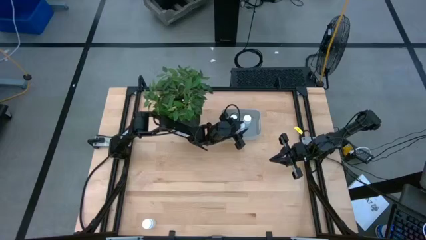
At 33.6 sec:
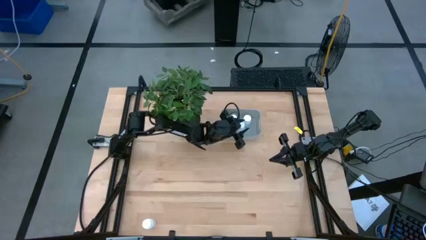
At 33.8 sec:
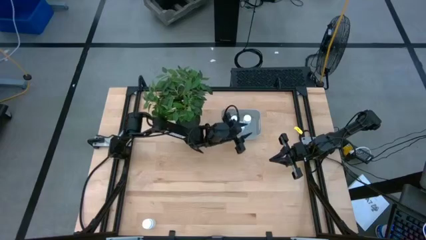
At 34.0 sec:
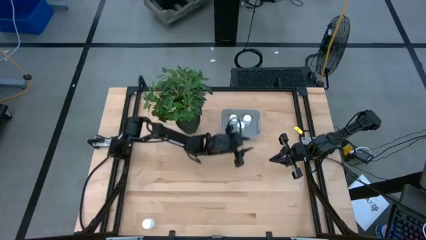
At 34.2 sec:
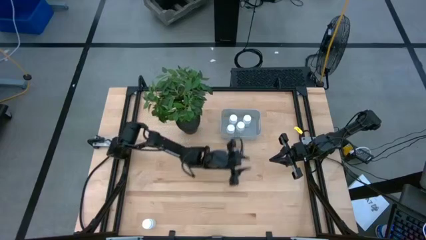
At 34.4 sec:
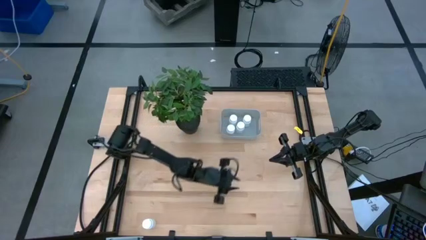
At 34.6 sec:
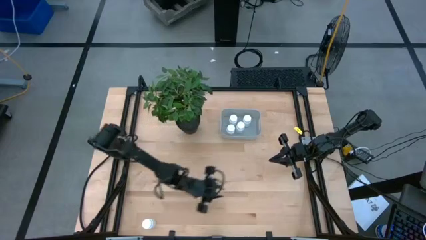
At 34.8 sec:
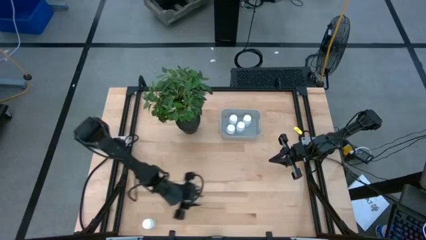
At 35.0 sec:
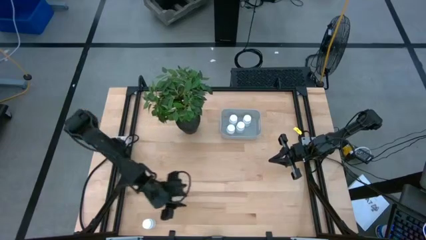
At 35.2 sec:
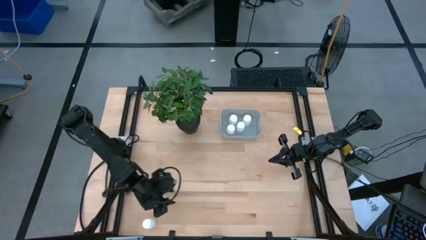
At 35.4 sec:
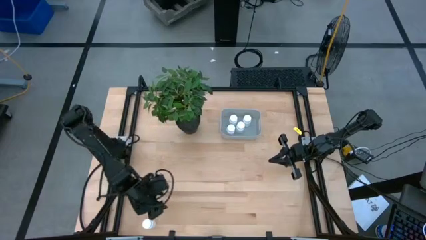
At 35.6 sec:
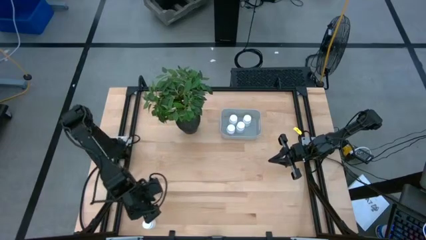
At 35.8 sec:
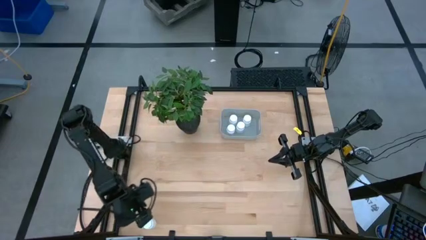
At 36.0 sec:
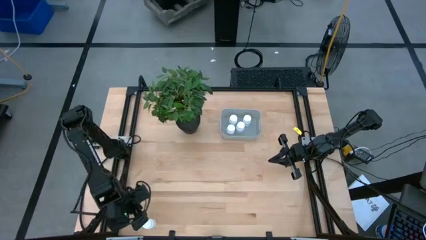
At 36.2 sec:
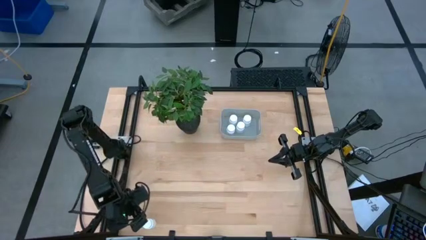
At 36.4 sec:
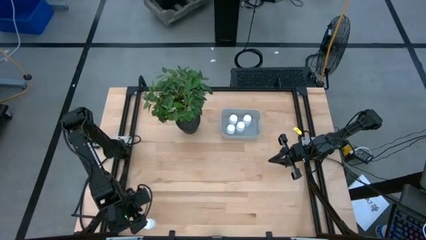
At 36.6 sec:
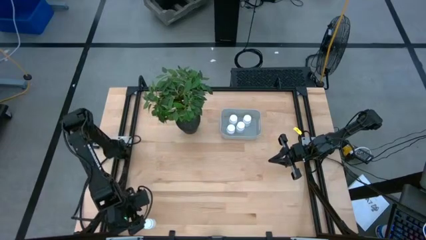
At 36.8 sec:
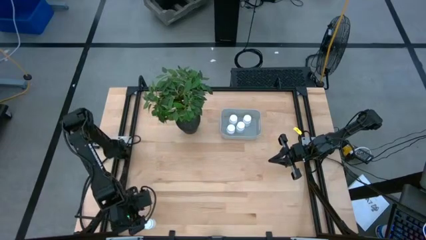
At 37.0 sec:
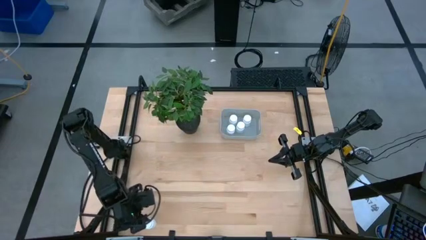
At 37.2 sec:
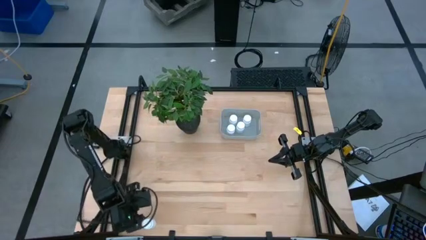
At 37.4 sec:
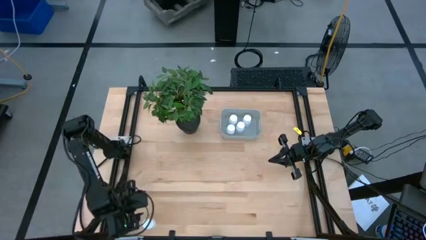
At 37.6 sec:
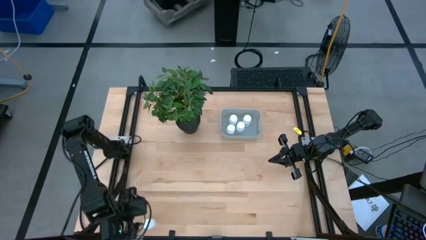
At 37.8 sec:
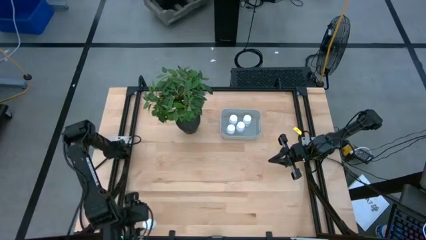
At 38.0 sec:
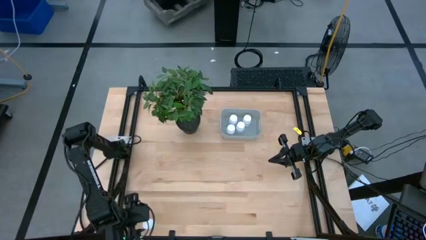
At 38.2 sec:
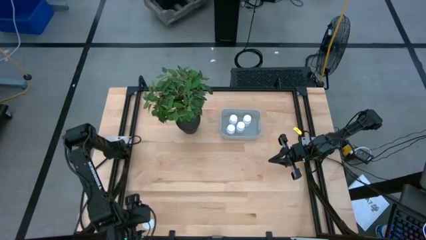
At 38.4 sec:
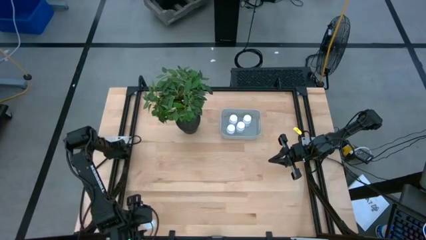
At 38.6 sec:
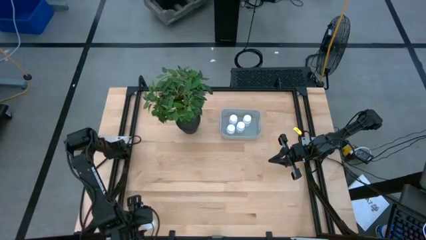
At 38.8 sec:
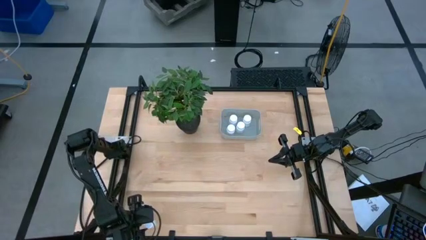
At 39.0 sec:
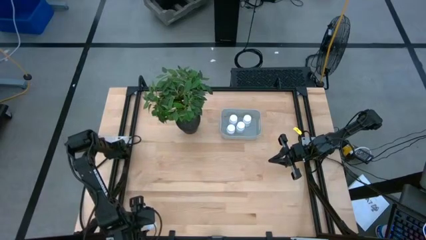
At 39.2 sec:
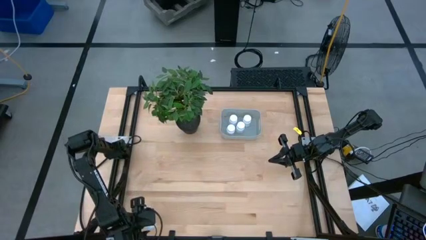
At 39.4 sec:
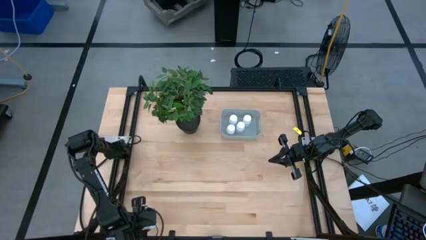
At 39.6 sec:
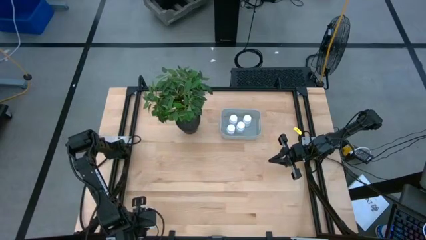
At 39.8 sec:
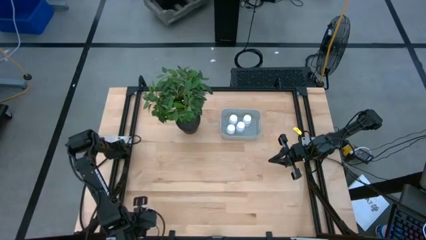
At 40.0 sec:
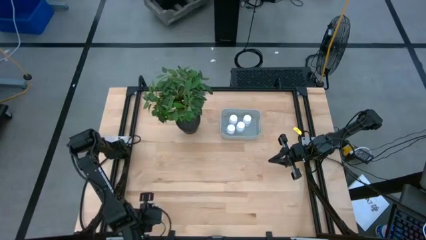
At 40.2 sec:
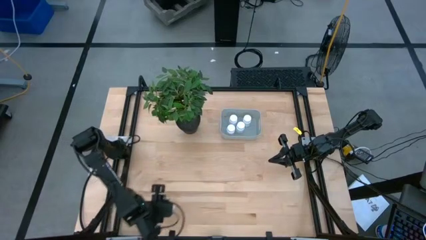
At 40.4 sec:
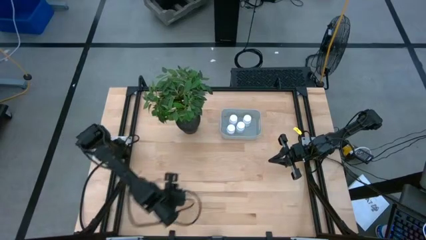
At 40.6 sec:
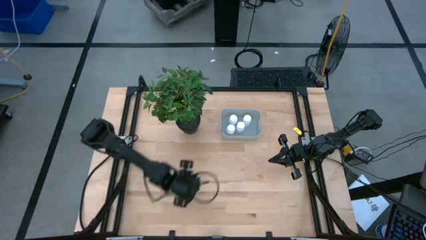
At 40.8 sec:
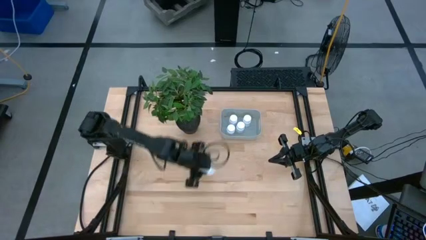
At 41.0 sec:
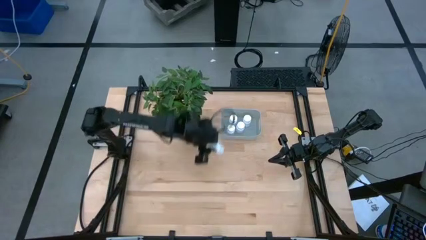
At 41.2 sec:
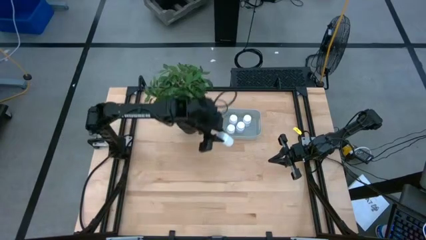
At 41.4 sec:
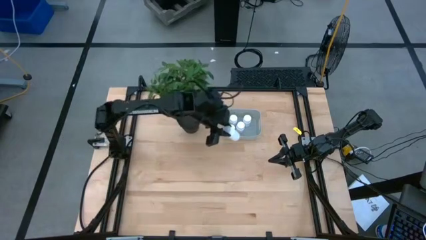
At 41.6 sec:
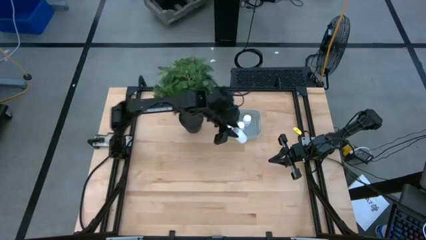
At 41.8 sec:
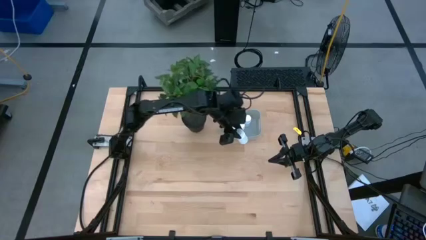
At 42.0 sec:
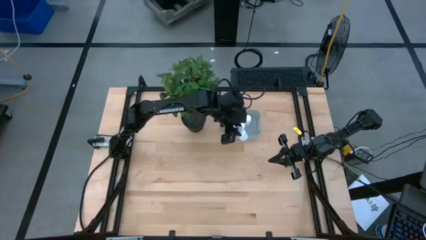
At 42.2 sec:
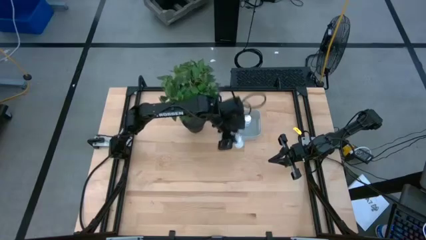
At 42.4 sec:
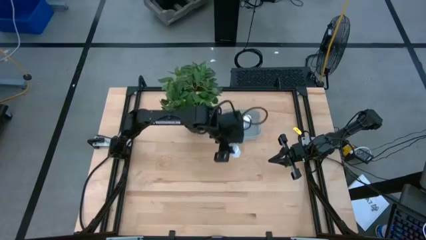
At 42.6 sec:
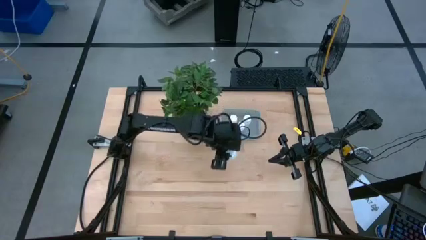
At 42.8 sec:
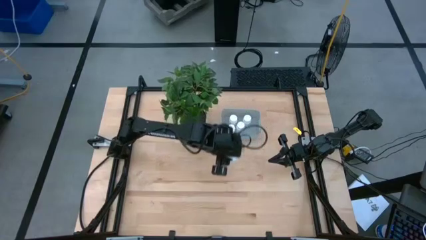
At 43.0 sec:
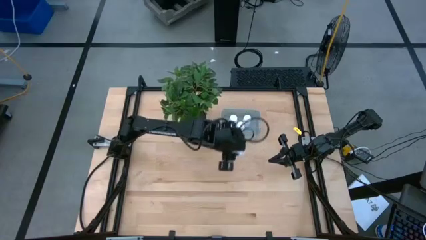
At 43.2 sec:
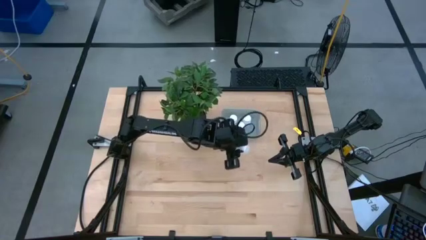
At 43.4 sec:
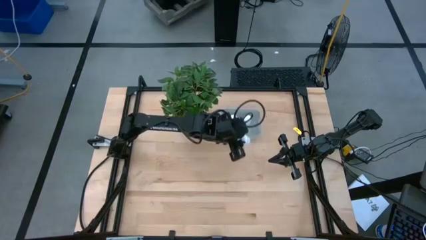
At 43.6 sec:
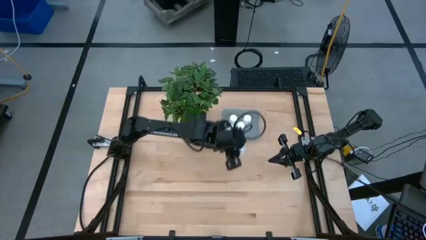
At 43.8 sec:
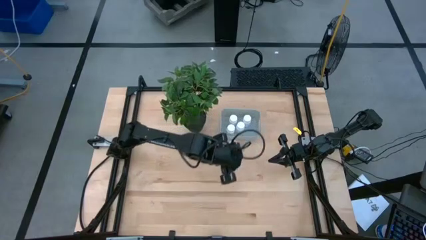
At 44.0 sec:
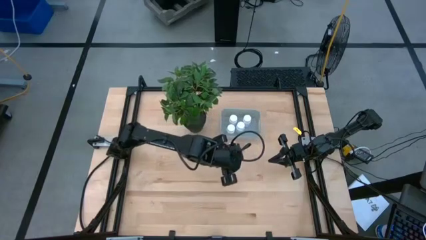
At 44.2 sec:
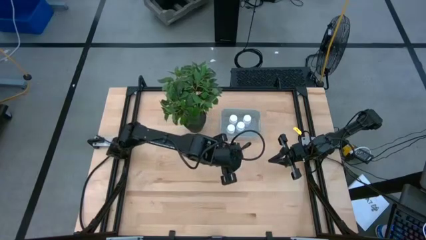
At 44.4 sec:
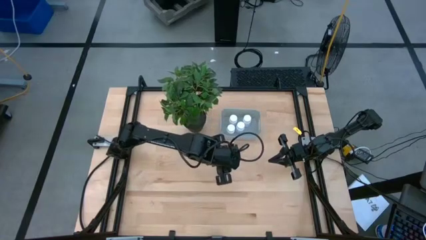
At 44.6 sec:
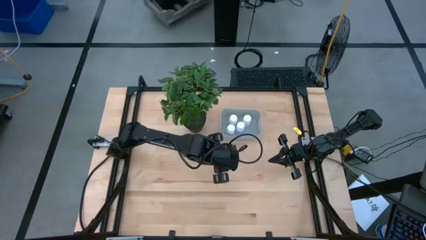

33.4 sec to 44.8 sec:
Task: Pick and place pill bottles into a basket
Put the white pill bottle into the gray bin

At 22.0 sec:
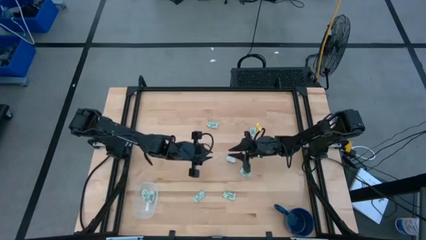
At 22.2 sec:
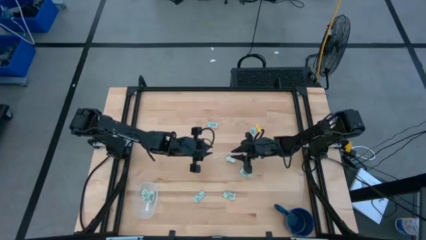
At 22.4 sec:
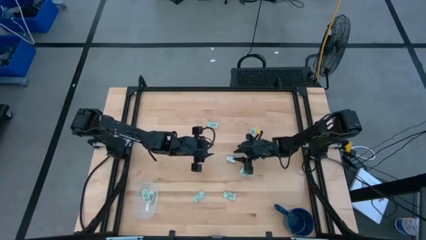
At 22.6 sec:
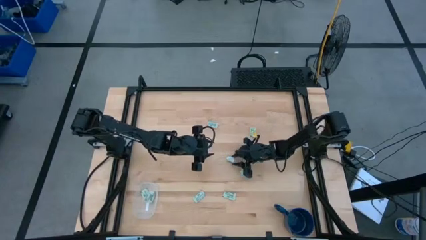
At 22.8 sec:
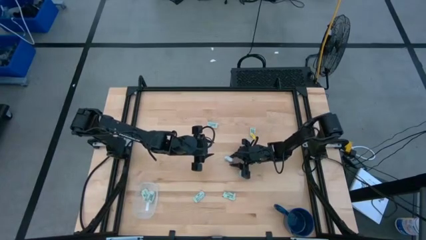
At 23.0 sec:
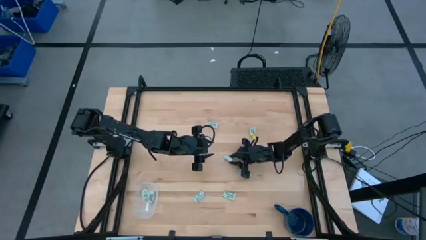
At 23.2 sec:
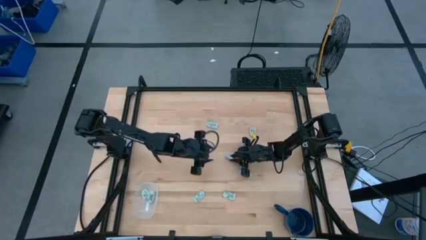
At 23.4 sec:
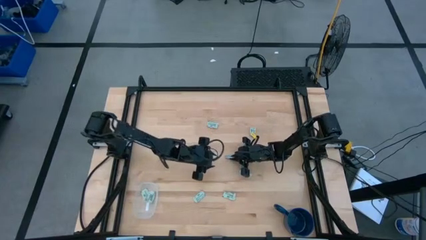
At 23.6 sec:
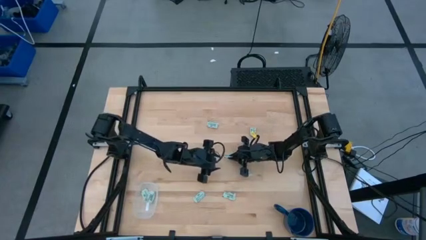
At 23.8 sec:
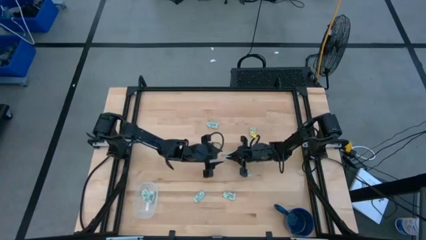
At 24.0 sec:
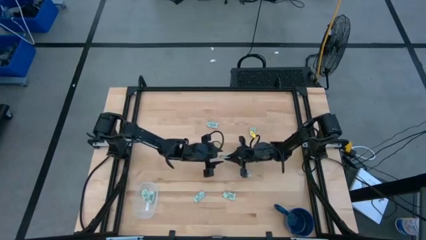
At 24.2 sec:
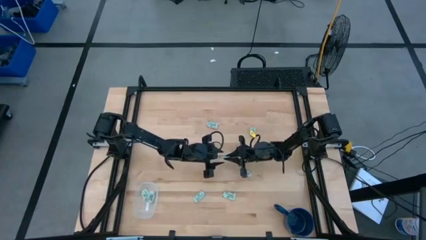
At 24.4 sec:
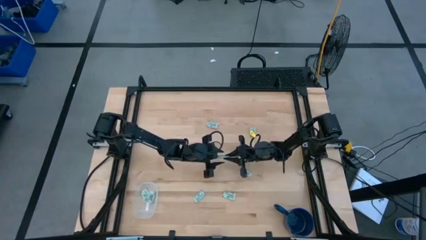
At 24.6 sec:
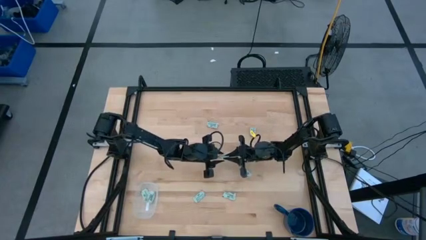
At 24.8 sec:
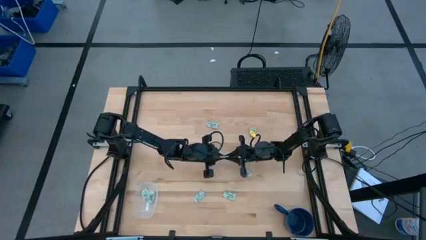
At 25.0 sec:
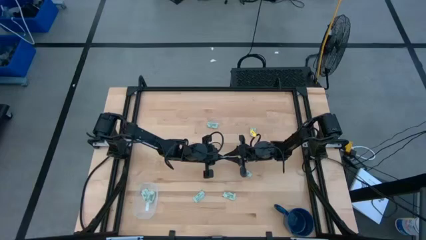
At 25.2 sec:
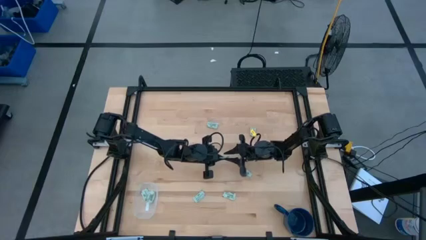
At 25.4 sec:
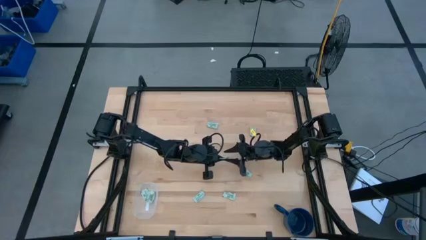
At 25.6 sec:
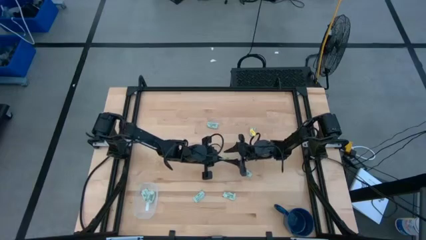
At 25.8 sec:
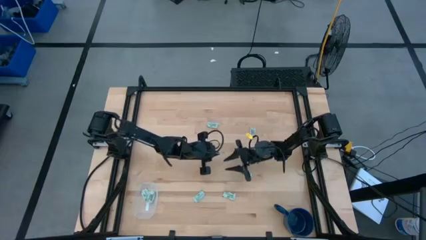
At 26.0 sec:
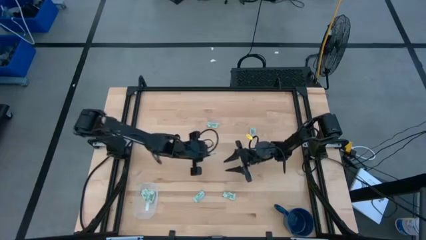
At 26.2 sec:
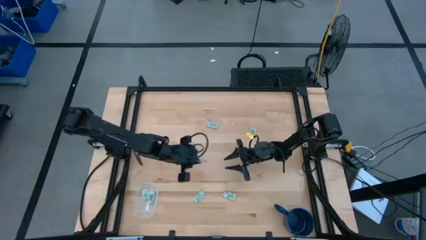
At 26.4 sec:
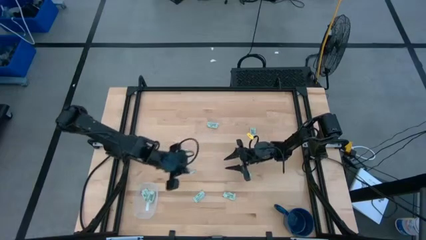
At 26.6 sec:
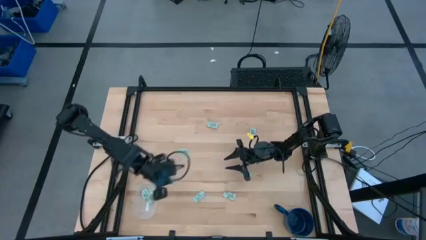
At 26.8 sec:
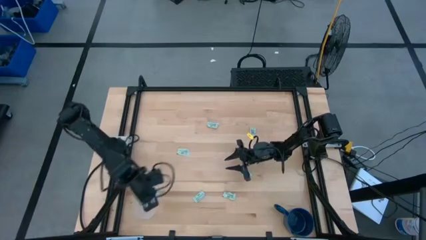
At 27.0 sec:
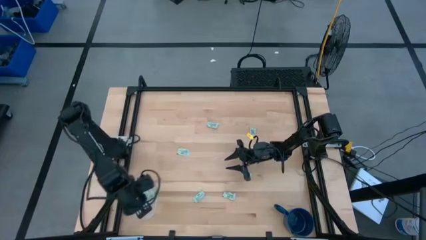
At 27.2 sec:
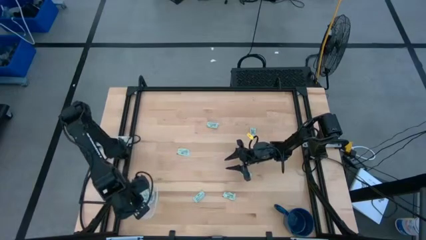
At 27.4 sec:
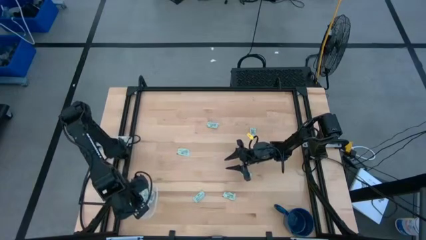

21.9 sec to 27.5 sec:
Task: Pick and place Stevia / Truvia into bins
Put the stevia packet into the transparent bin
